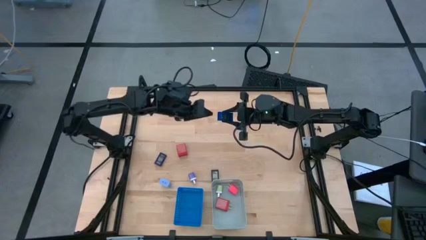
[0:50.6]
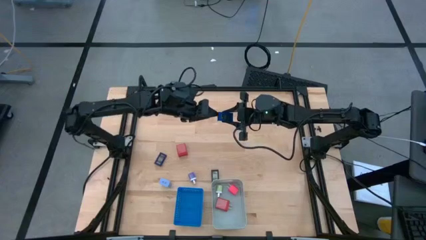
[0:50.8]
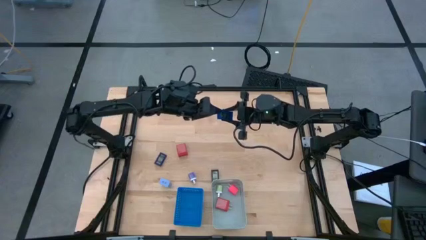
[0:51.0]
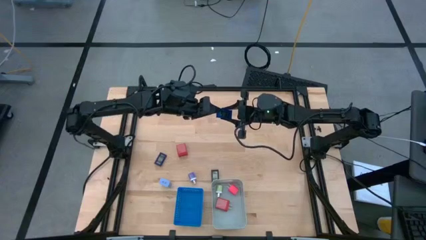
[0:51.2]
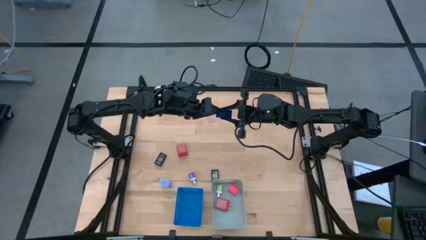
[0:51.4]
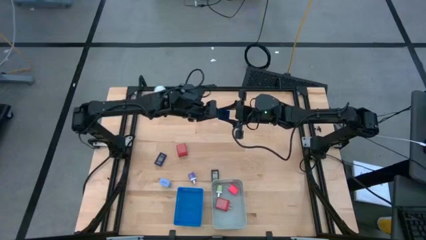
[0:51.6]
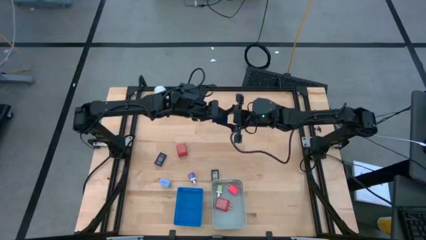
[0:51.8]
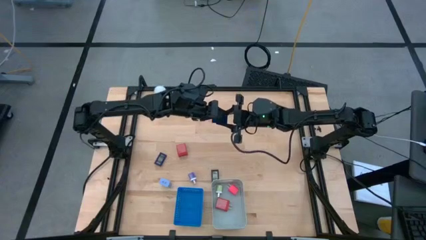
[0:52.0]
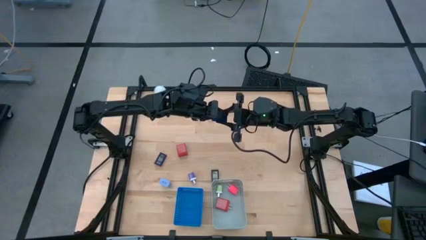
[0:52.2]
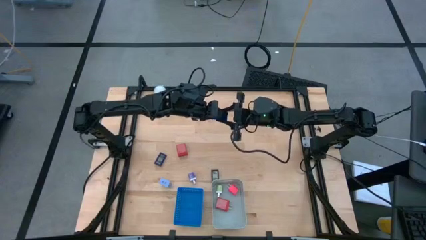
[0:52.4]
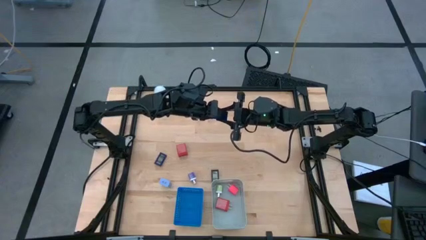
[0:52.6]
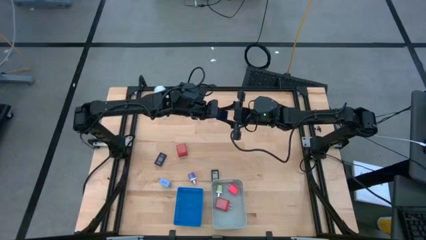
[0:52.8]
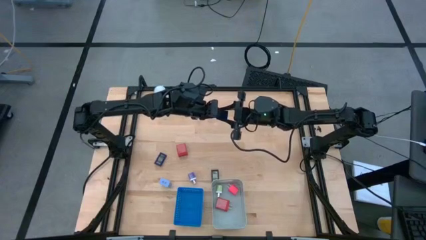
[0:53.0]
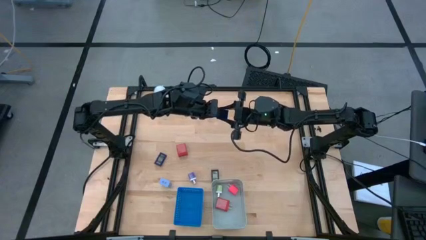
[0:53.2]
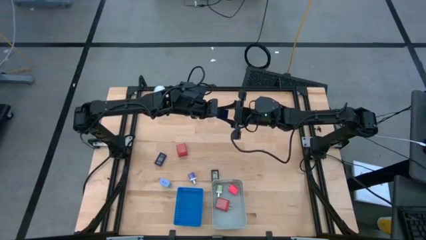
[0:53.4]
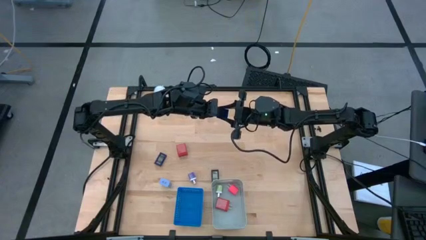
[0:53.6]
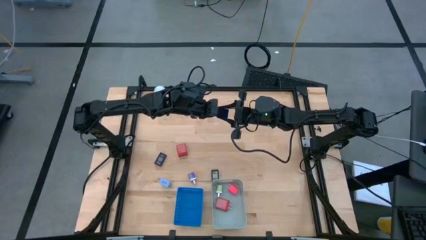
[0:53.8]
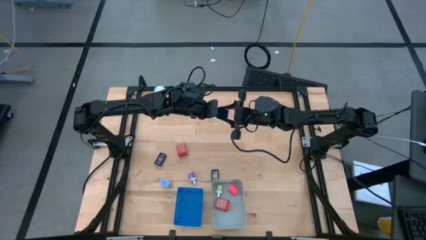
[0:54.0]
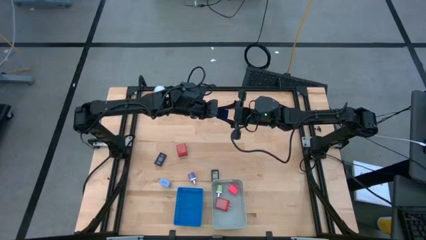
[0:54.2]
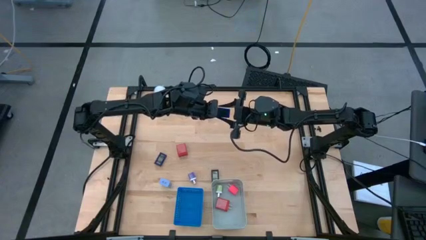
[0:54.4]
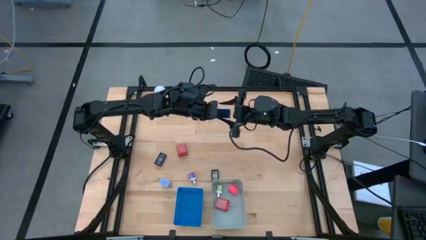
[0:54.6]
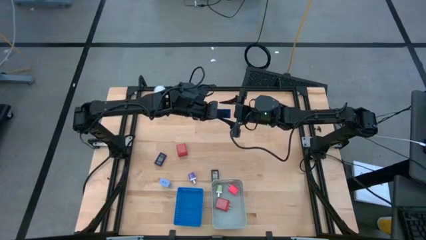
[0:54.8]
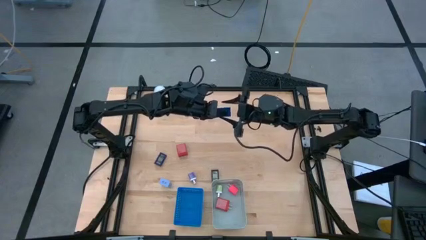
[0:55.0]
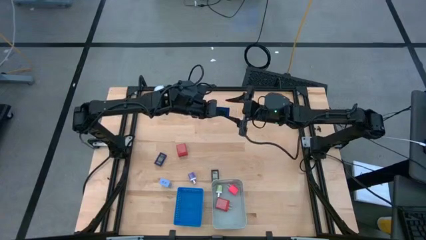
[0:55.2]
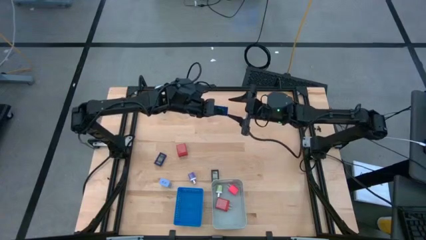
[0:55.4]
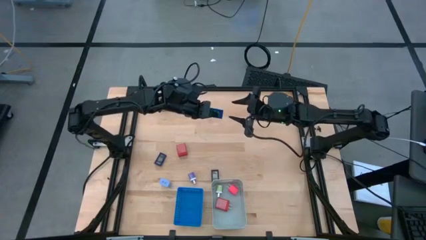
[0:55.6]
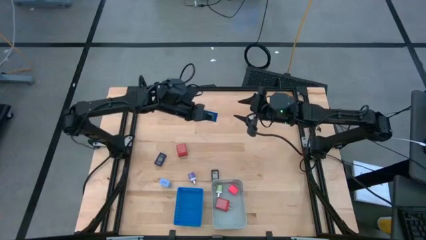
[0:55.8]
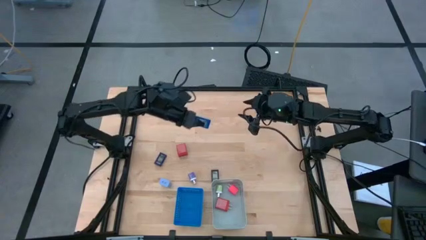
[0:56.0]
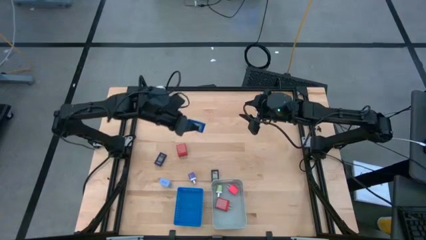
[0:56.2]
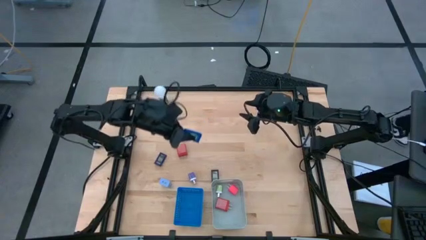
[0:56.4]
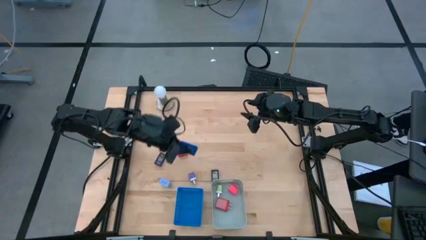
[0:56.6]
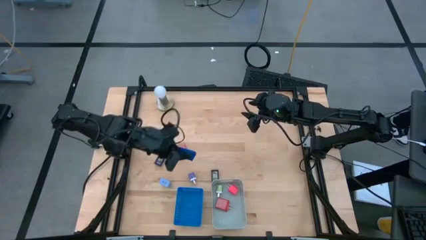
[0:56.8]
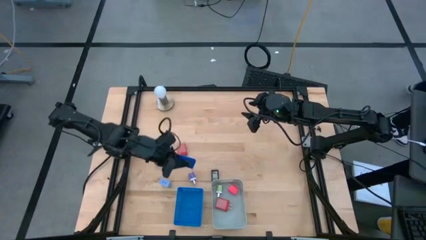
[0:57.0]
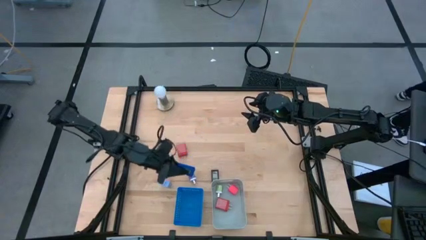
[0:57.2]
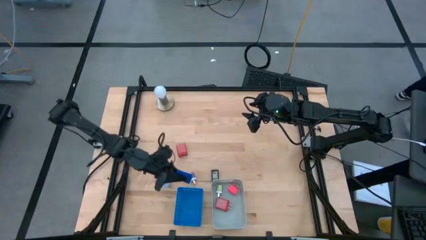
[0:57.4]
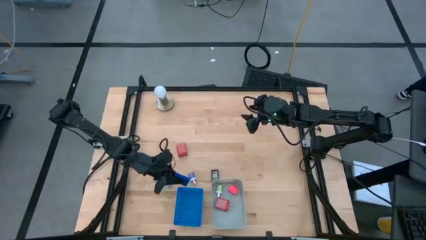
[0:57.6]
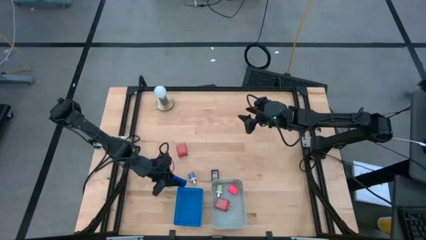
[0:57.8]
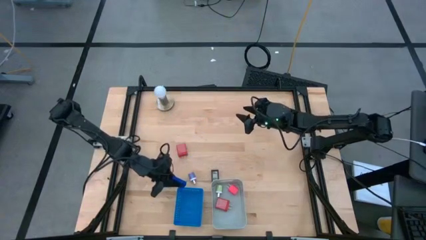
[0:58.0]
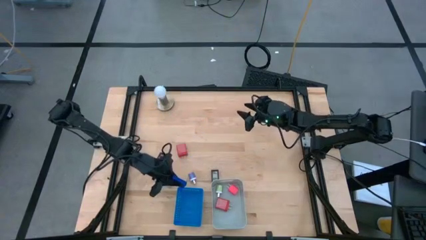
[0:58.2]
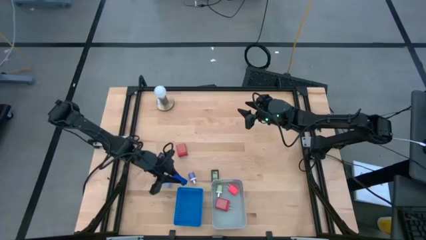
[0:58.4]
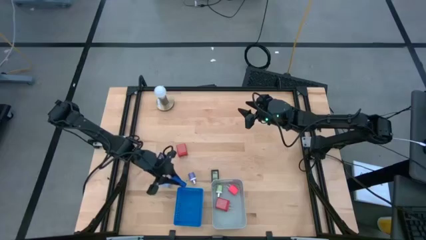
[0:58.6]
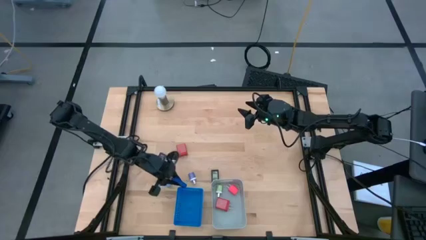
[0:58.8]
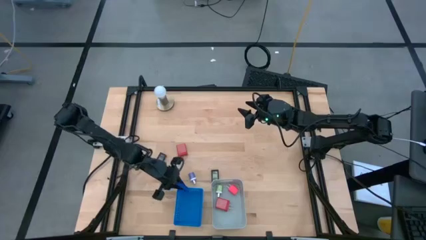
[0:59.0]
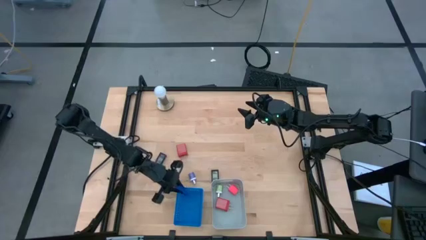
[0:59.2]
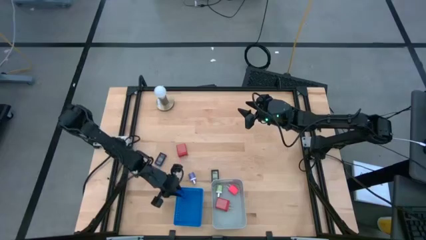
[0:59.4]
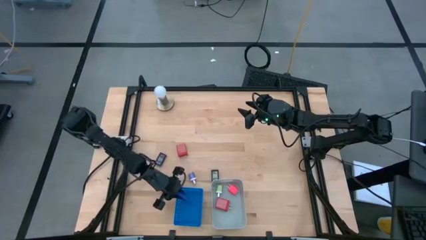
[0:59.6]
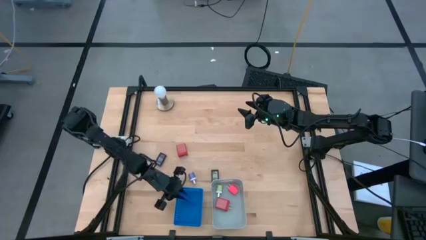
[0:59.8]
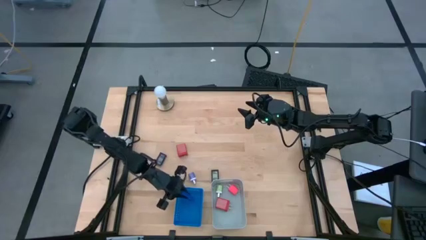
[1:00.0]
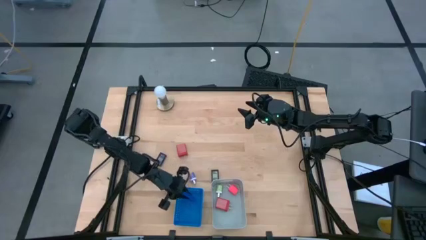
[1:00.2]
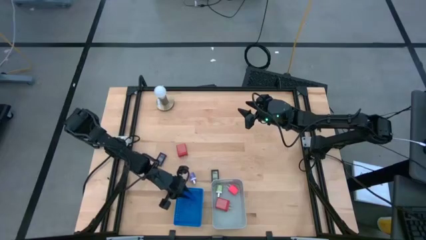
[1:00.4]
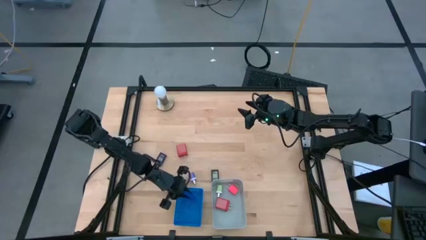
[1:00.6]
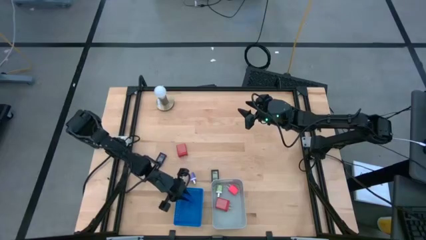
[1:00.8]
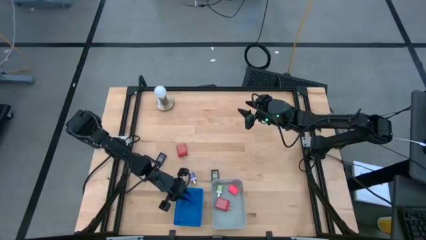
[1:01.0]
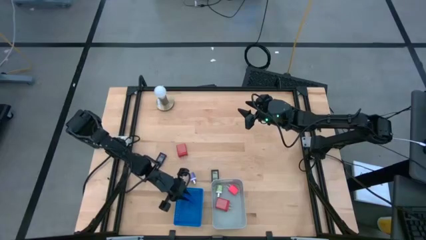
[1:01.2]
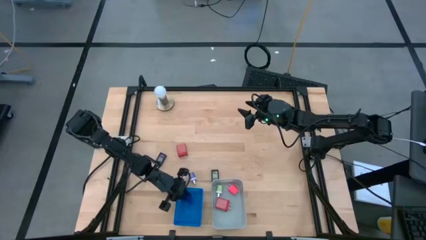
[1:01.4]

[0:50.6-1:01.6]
Task: Pick & Place Office items
Put the blue digital clock into the blue bin
